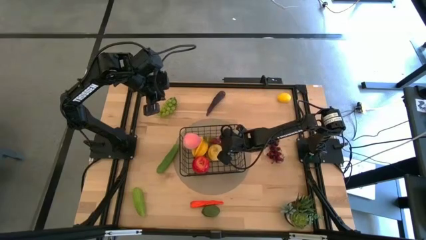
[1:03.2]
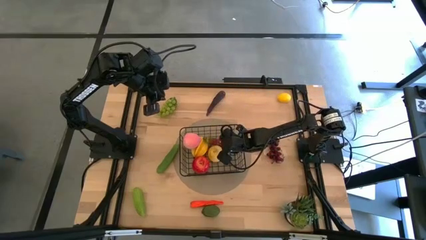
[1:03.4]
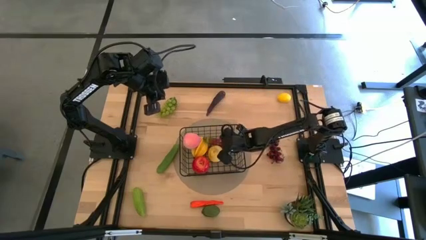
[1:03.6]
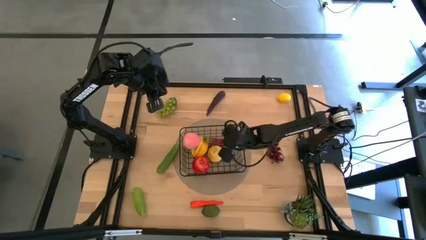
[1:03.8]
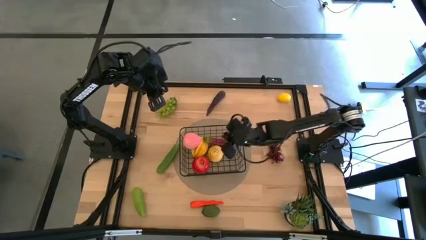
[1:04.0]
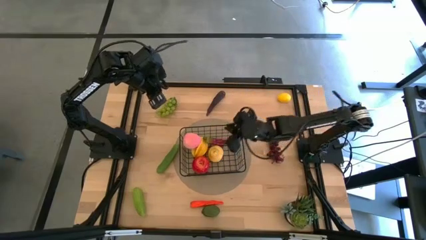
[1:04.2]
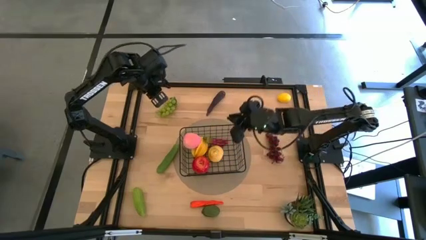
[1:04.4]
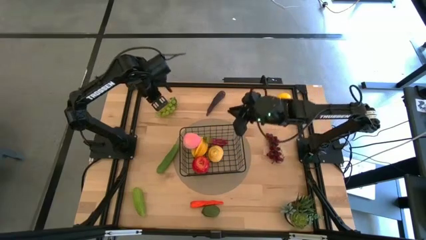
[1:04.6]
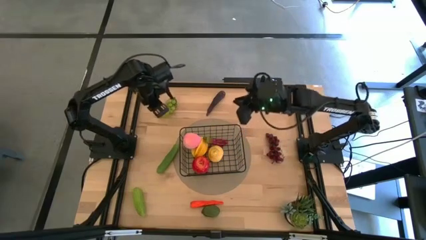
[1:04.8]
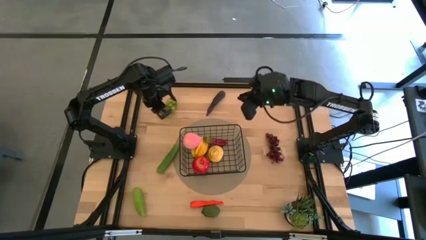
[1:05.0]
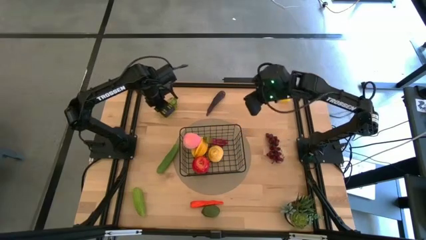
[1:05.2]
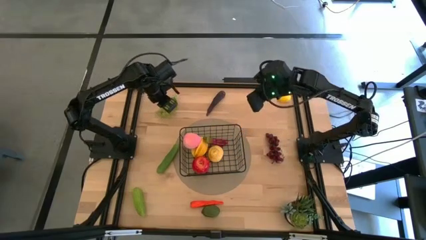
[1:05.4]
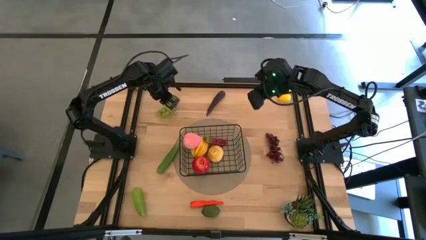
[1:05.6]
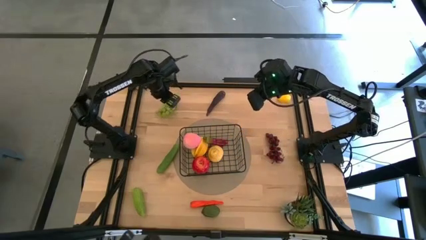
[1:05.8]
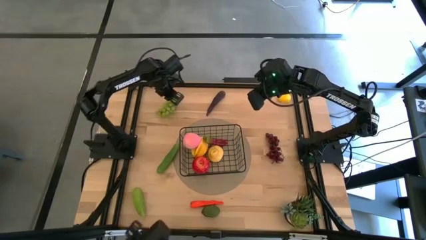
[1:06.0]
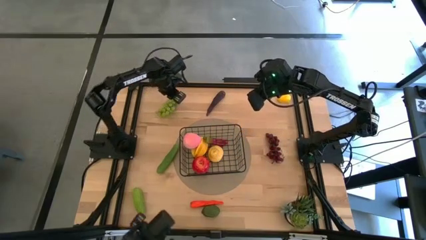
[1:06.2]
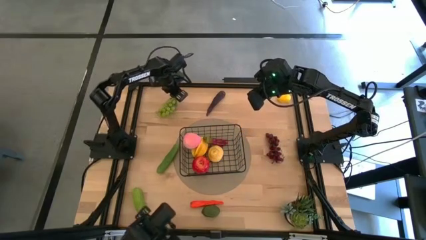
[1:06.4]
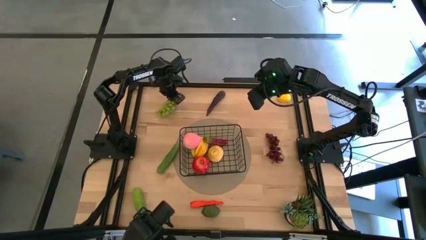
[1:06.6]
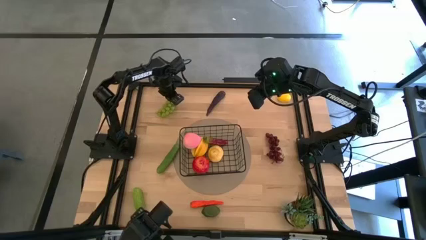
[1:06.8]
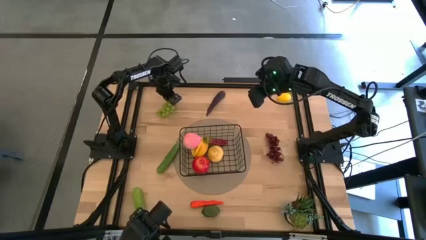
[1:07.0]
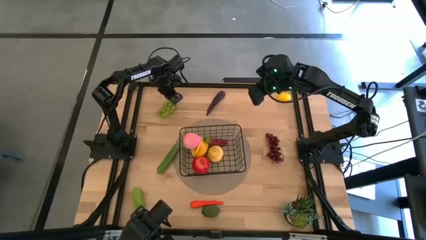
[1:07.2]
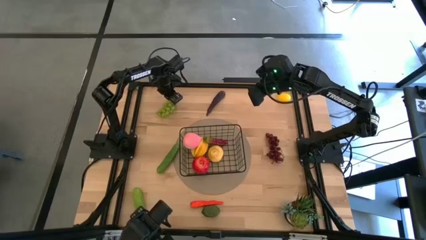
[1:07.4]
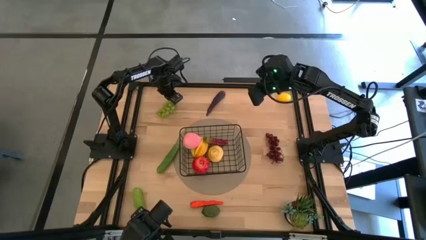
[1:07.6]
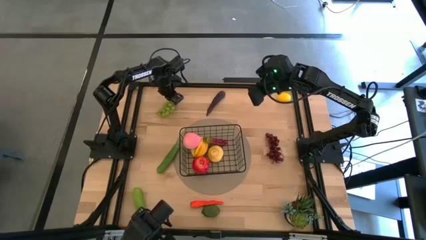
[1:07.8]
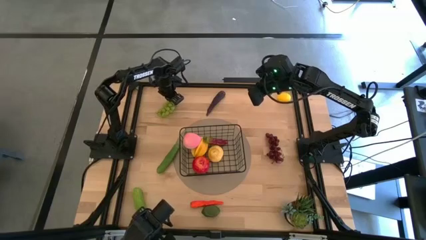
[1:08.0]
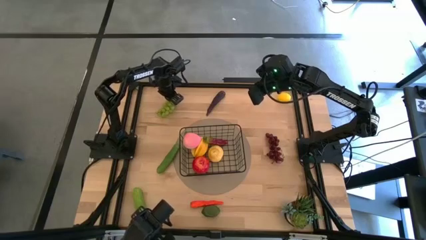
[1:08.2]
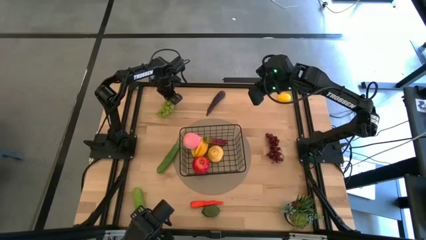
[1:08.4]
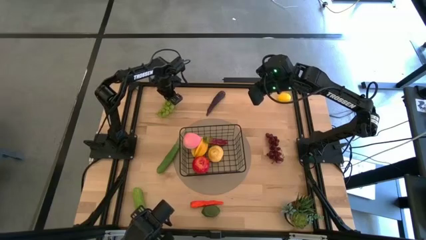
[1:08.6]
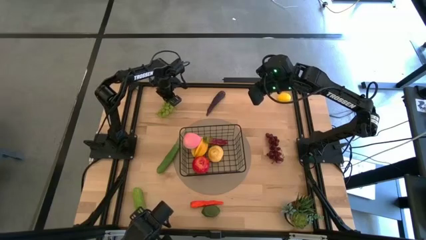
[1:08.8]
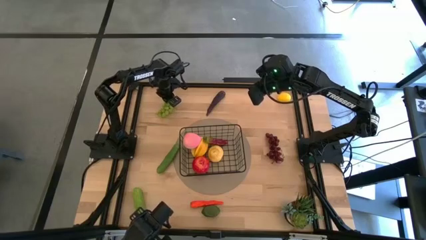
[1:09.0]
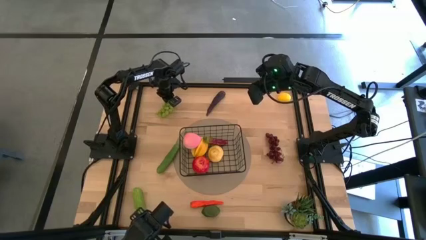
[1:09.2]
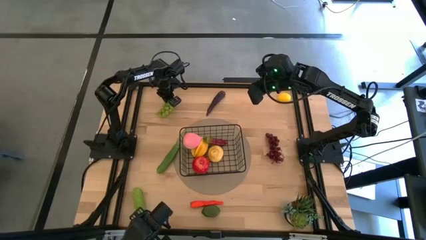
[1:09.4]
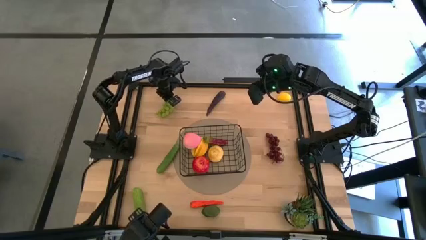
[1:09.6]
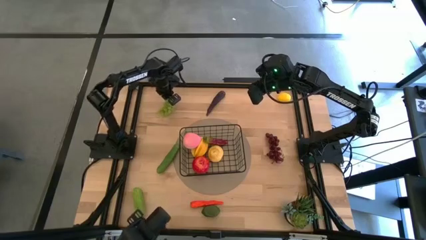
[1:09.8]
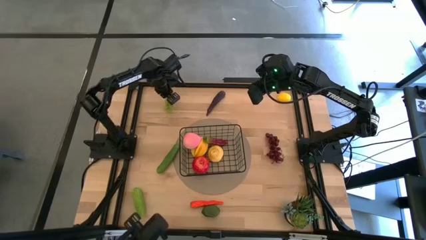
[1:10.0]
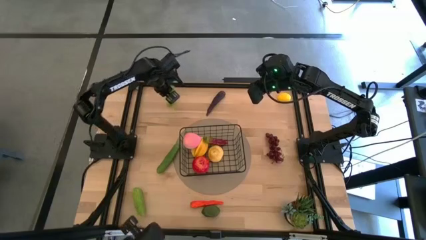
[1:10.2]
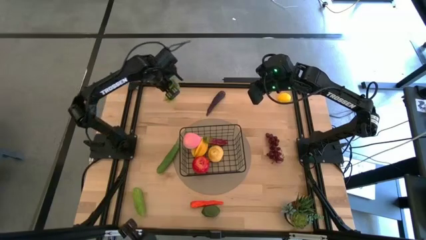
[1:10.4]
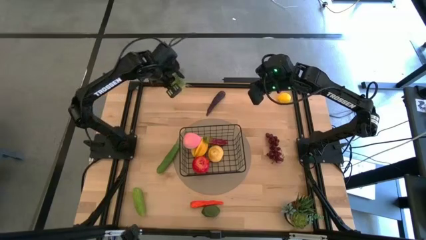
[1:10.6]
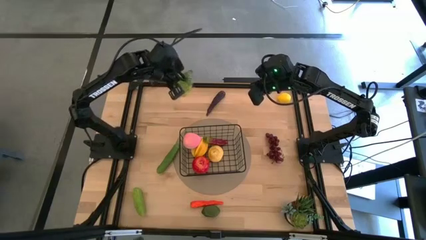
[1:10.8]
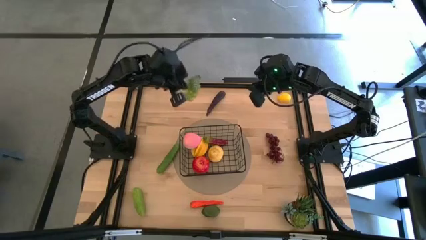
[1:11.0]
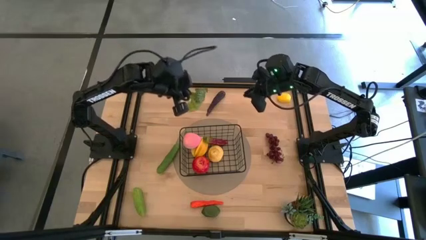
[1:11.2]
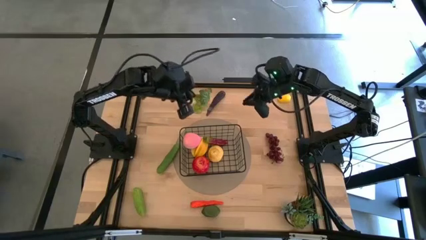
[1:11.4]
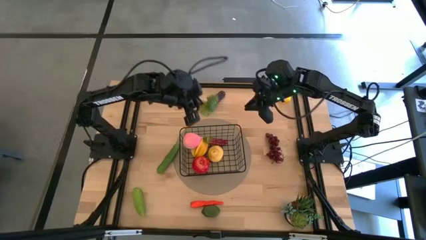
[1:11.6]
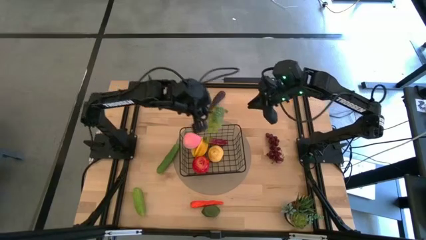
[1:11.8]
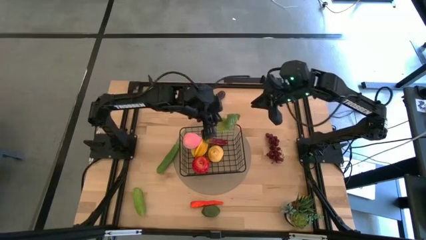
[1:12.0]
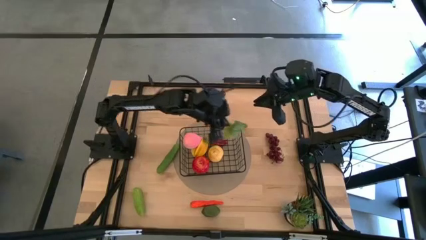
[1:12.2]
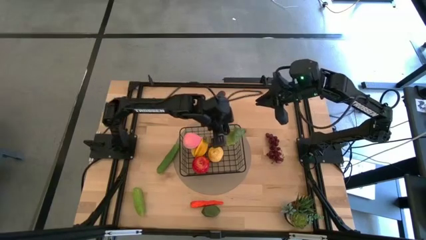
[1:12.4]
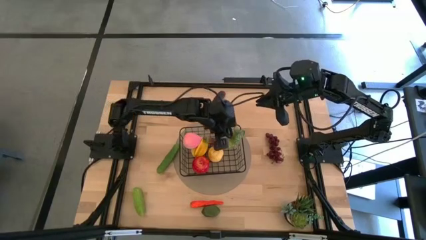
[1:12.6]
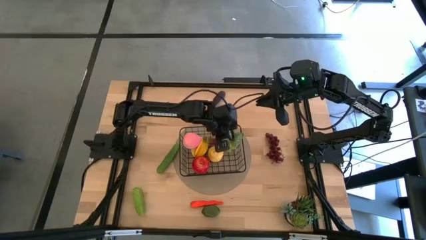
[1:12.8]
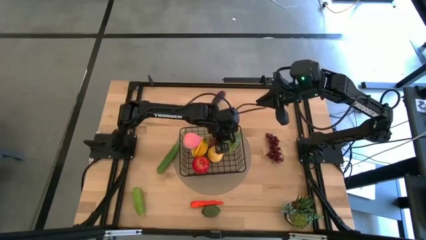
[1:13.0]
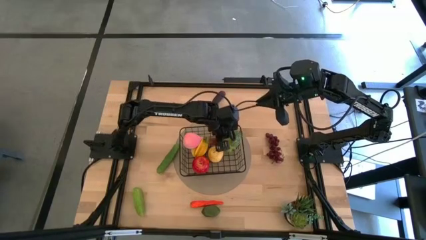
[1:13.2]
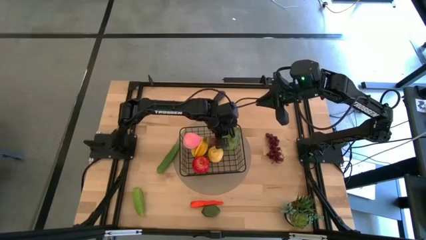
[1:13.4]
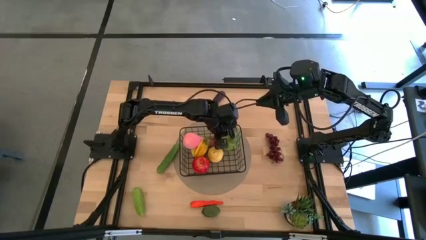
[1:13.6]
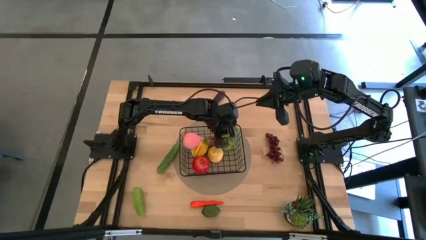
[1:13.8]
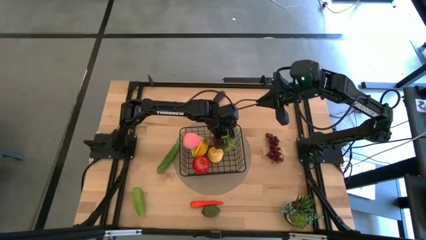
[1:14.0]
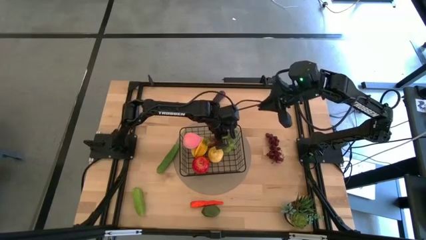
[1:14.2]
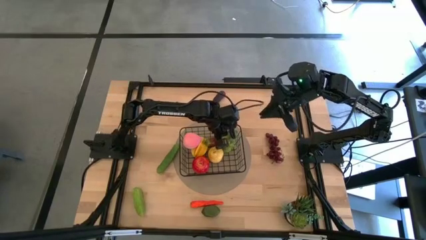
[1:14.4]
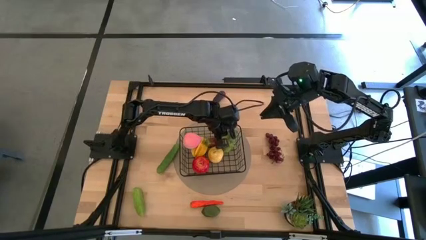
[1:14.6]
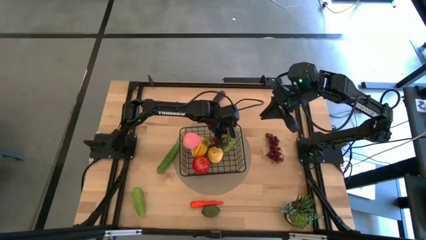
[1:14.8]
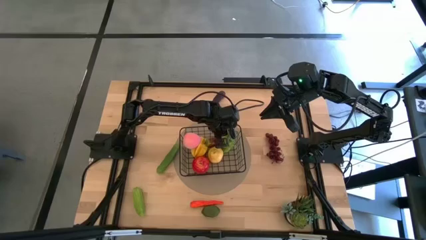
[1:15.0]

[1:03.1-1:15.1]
Task: Build produce basket
Put the green grapes into the black wire basket

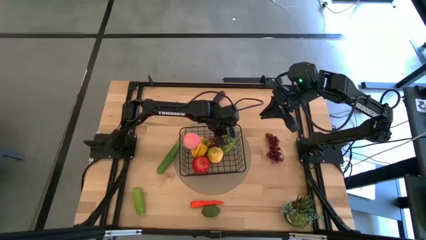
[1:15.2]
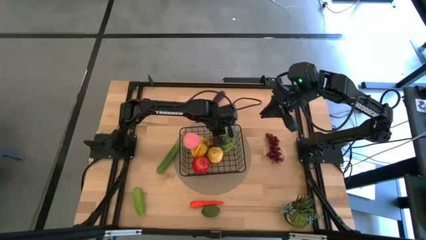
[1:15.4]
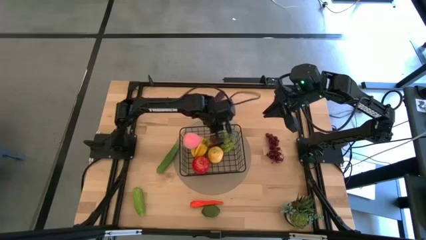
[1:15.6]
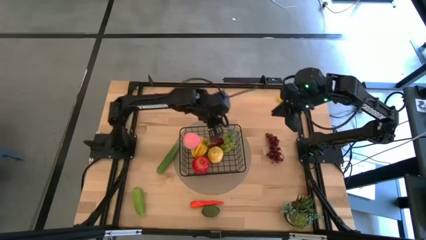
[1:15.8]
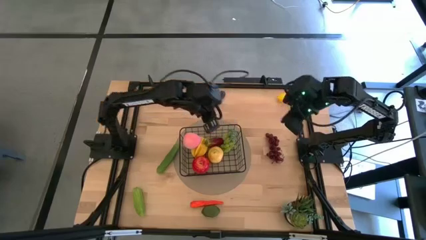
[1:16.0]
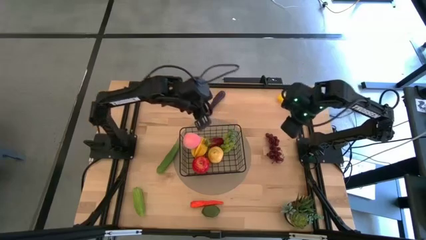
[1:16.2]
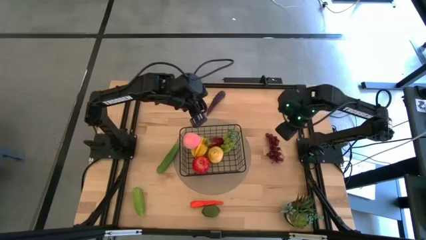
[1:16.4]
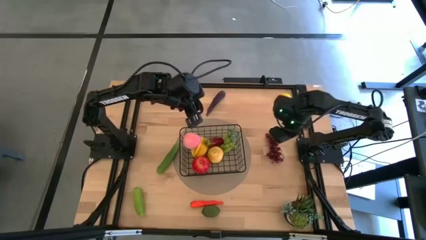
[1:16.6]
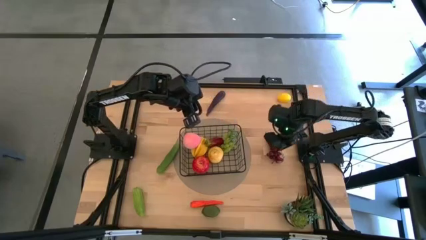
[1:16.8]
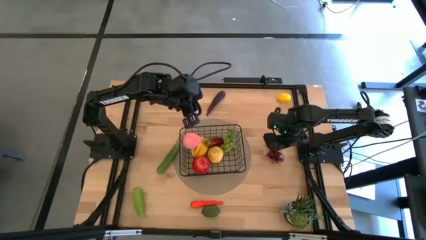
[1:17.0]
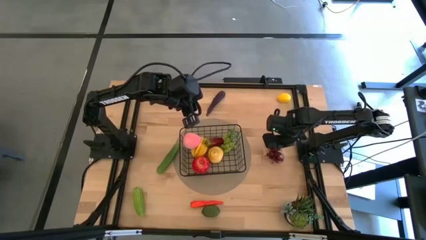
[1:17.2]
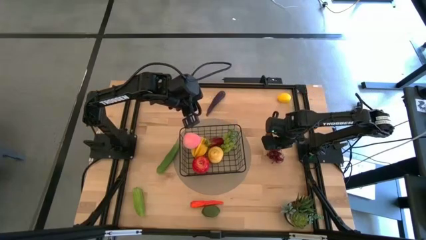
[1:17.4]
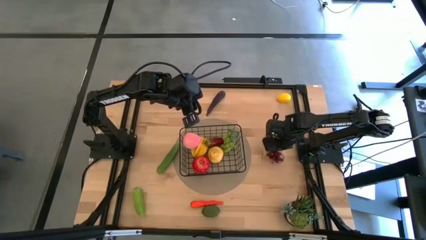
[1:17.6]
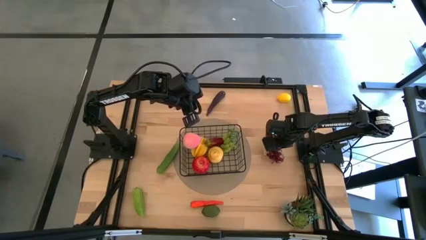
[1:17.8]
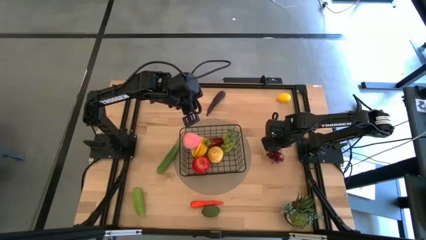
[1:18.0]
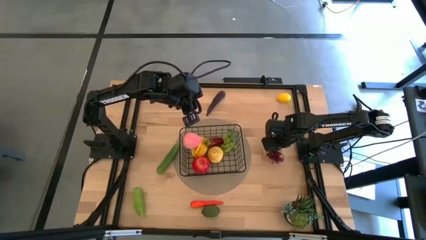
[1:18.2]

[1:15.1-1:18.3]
Put the red grapes into the black wire basket
